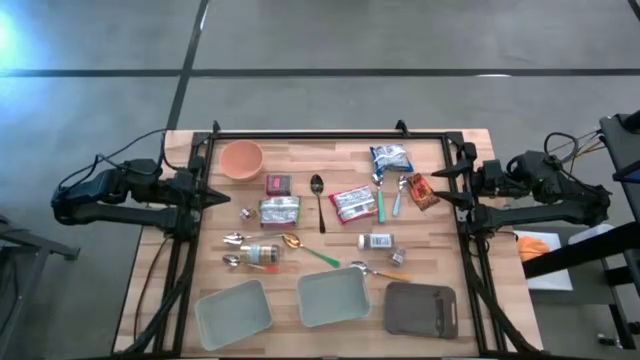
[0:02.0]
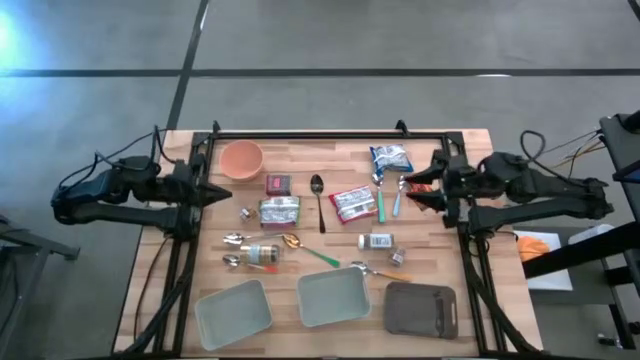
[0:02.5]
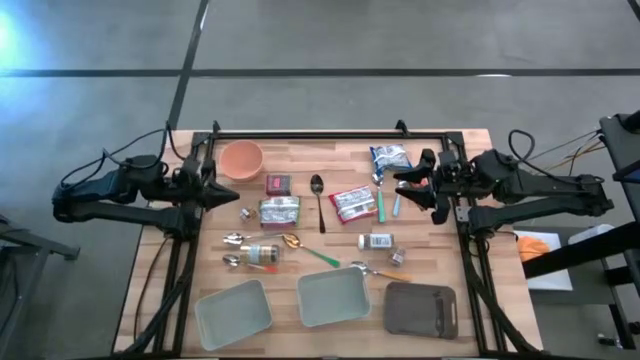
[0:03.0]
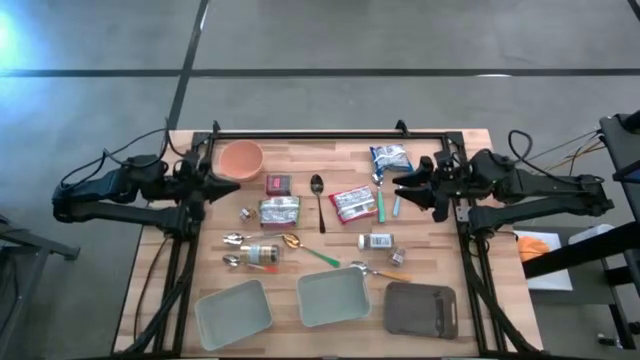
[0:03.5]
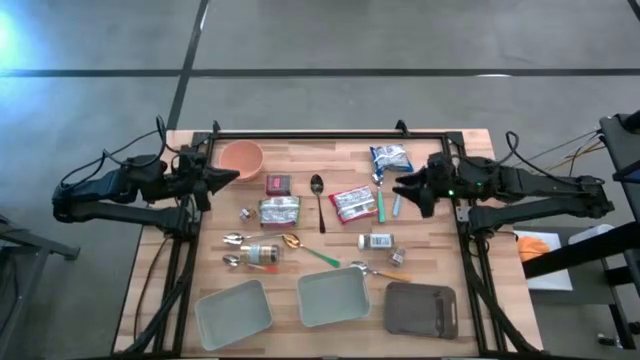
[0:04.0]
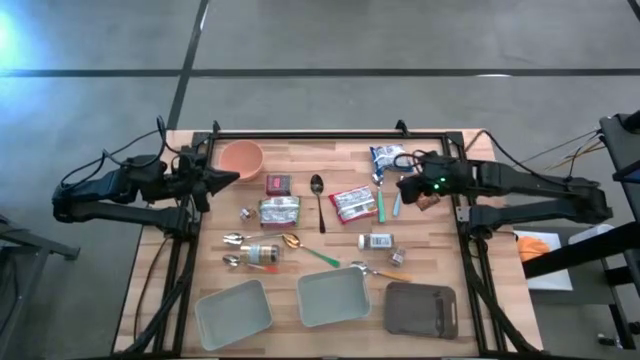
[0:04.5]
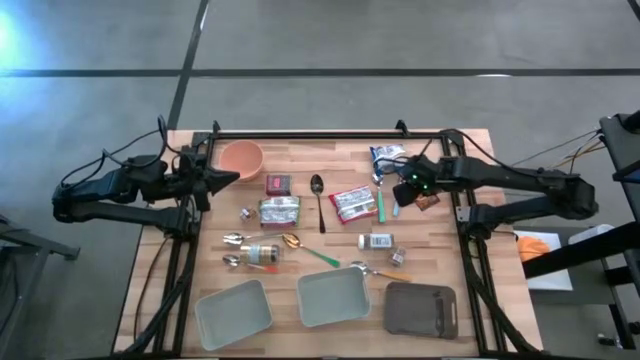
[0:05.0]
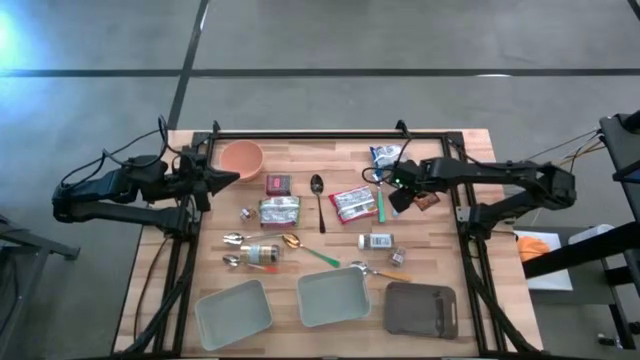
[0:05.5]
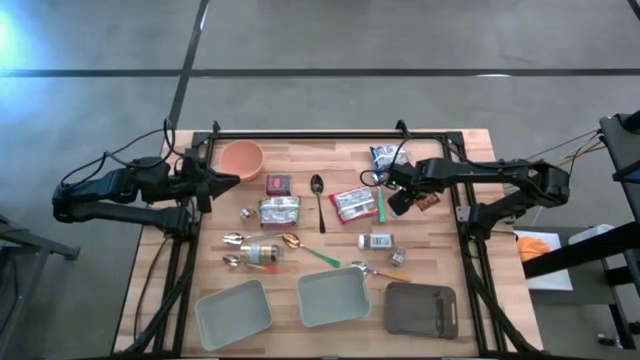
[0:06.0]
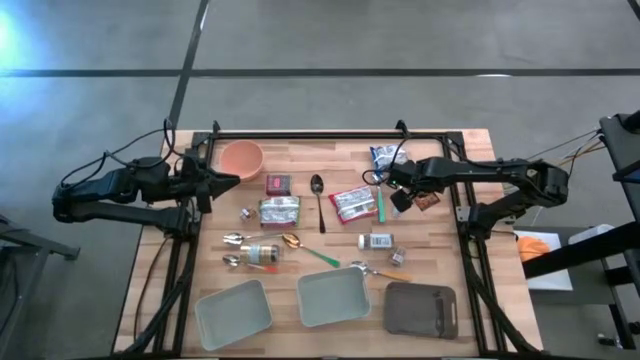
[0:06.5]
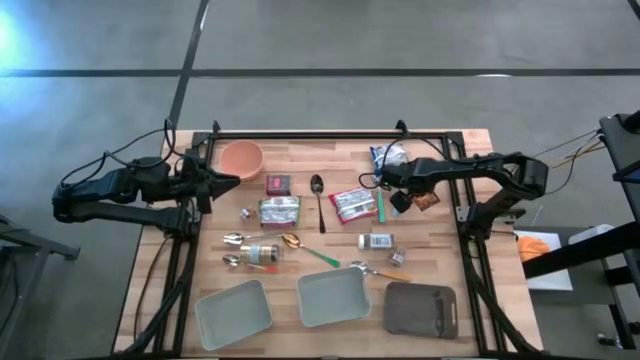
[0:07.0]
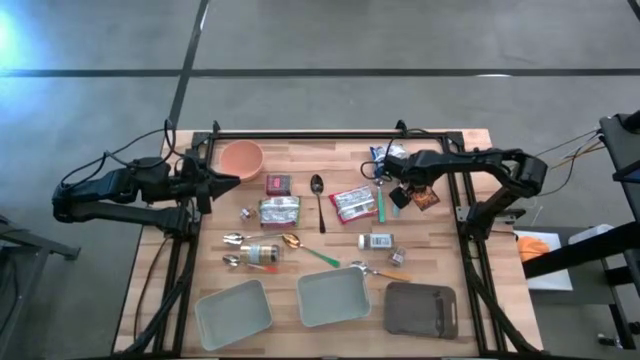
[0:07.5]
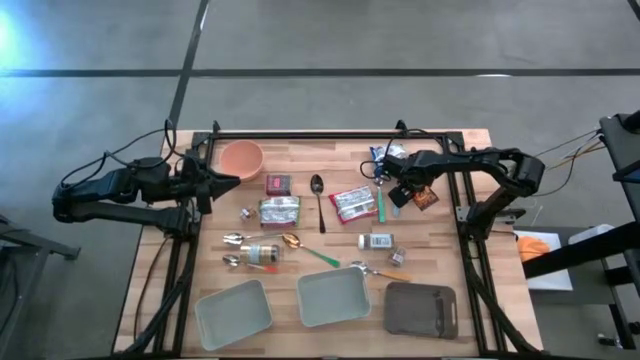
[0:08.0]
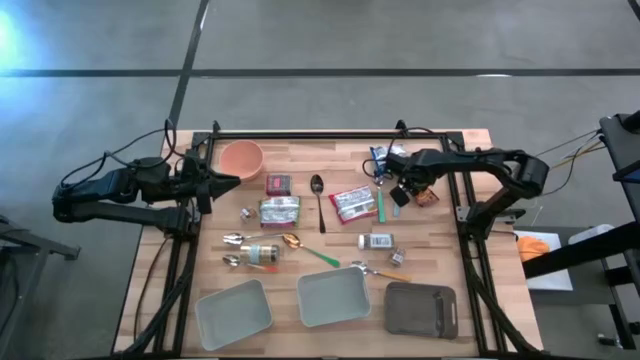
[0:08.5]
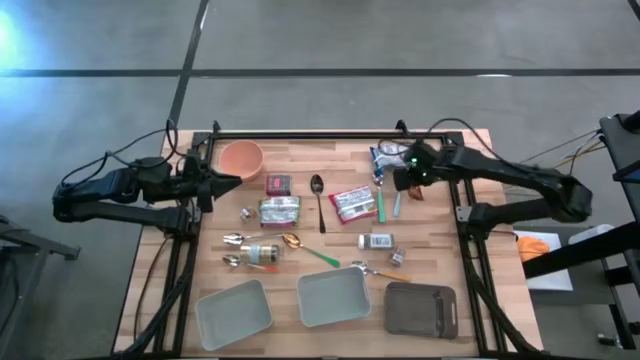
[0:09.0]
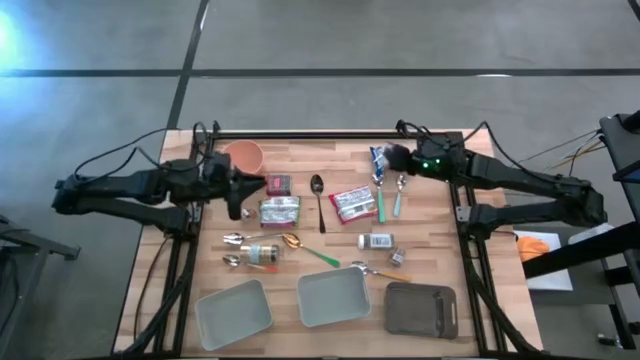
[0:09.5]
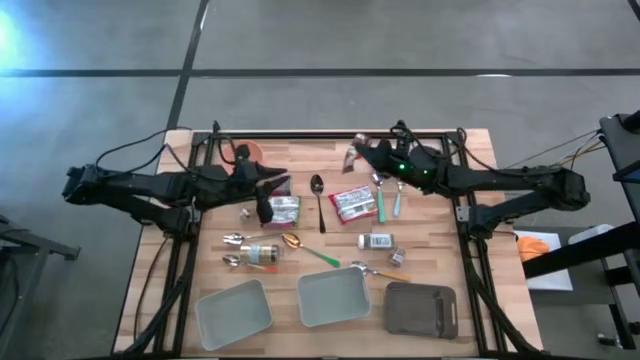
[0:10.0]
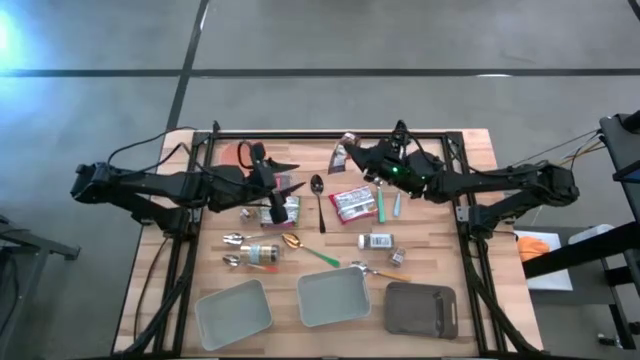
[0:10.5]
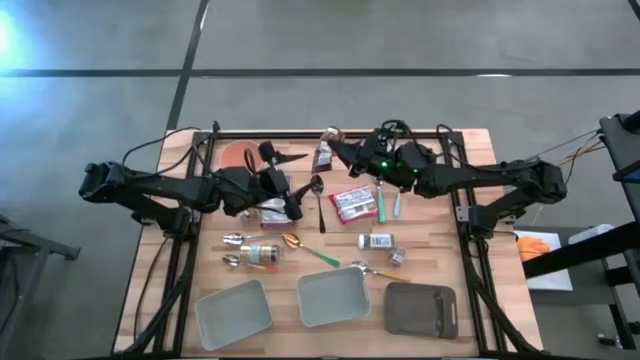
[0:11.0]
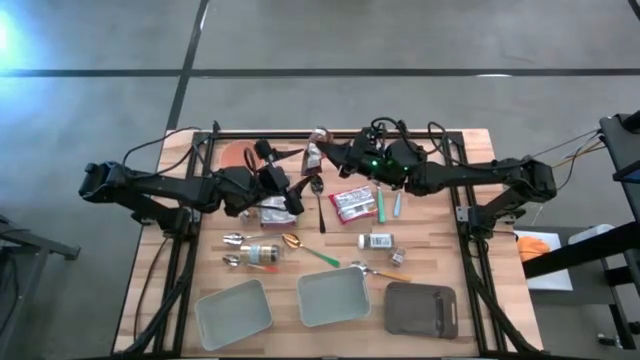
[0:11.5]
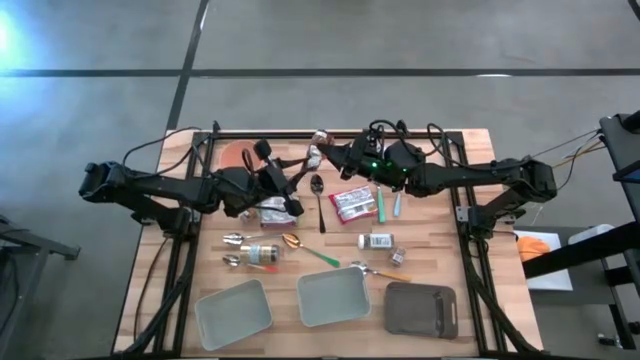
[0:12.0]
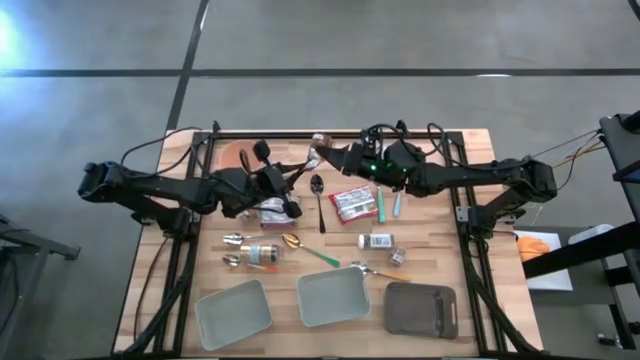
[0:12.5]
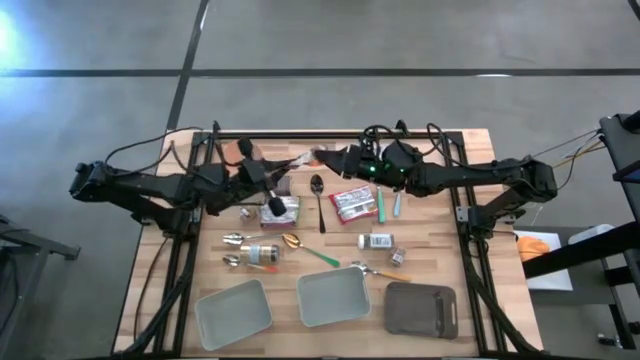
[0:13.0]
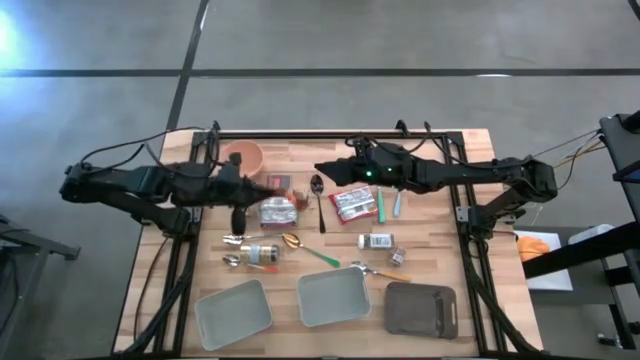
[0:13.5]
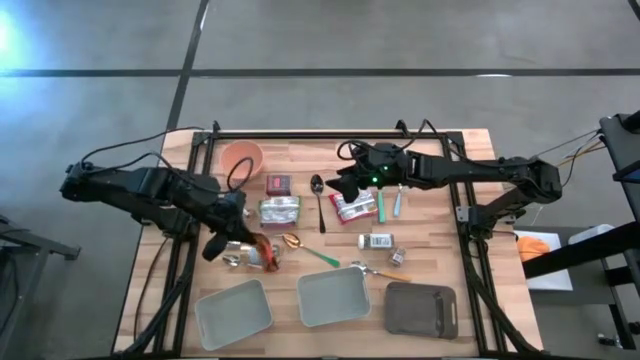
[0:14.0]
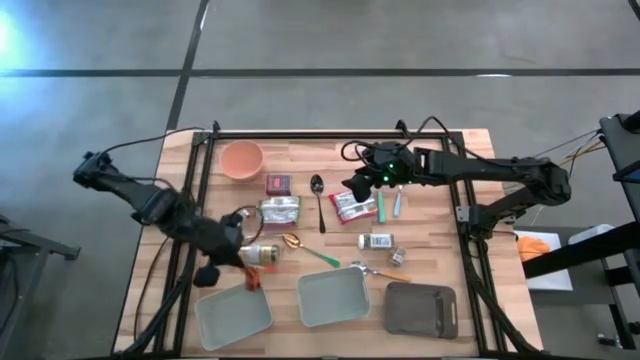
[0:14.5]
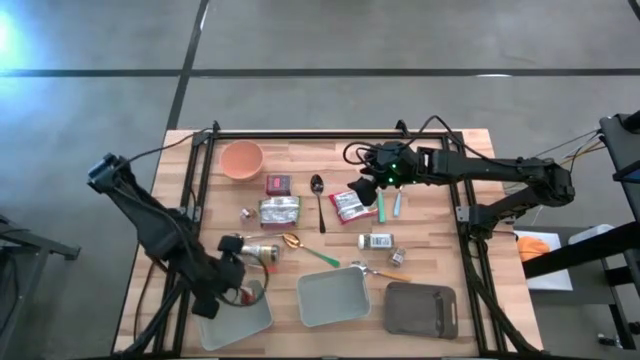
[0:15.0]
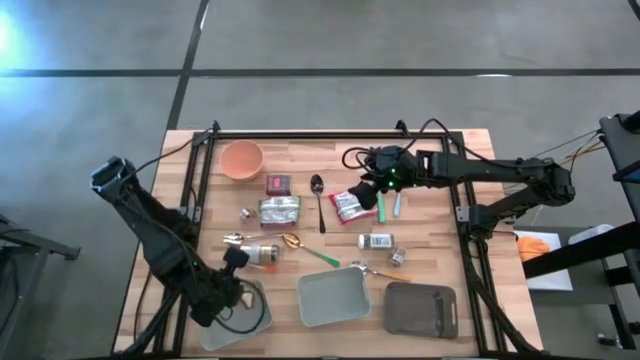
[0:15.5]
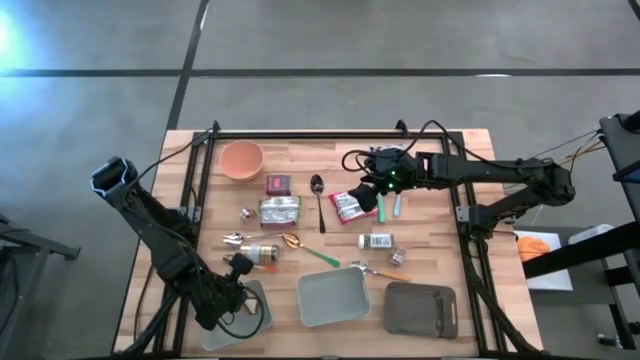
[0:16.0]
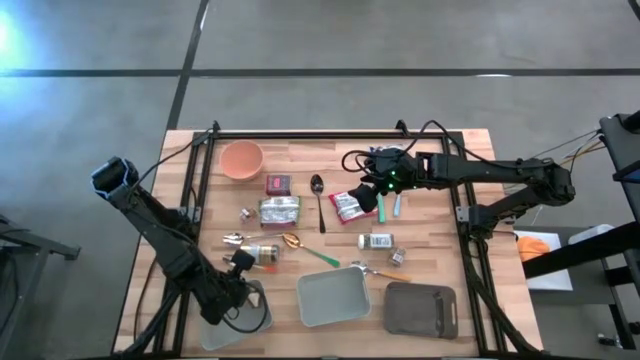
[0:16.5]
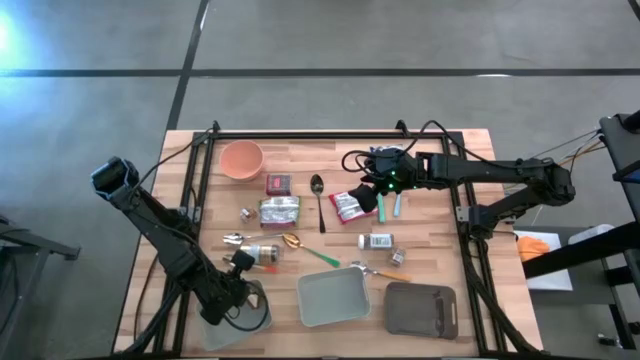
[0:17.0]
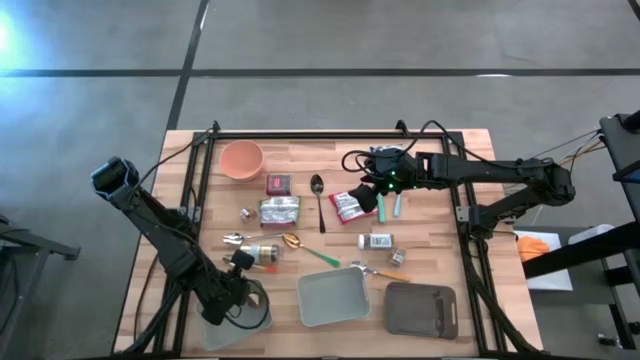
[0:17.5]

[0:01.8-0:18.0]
Put the orange seasoning pack into the left gray bin
